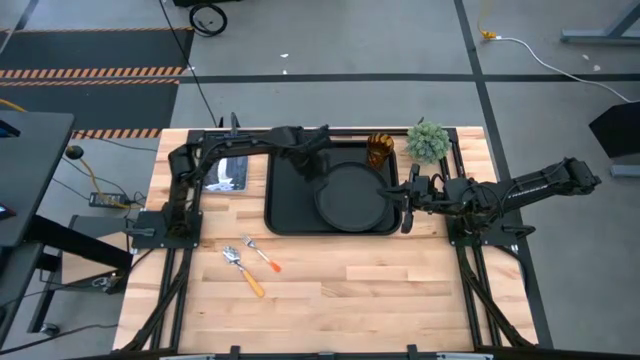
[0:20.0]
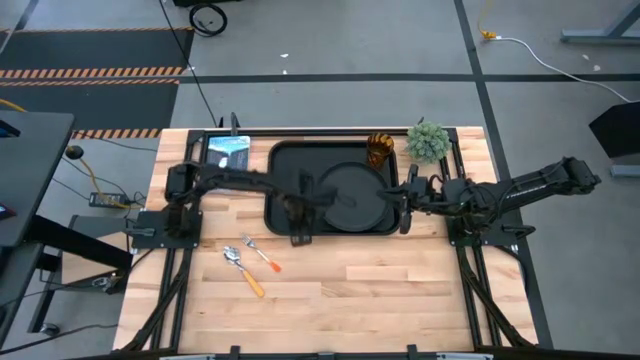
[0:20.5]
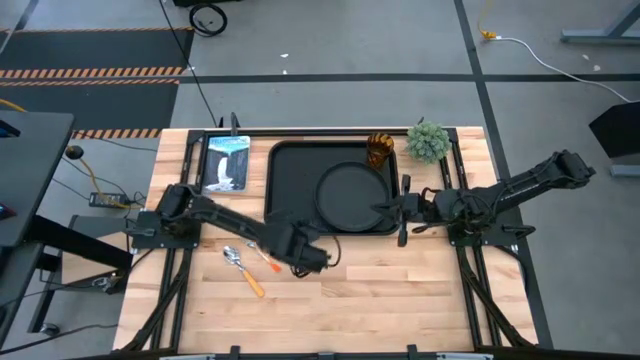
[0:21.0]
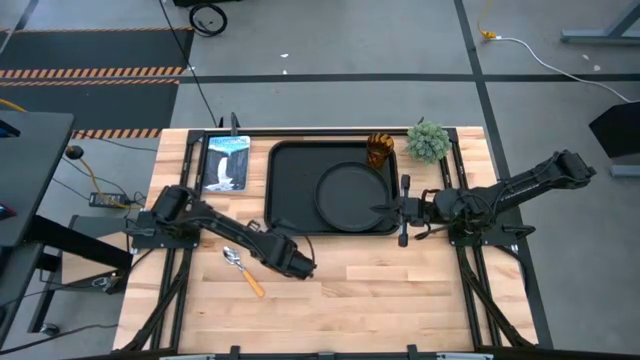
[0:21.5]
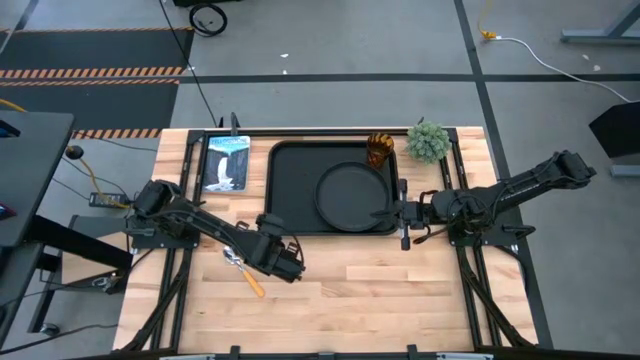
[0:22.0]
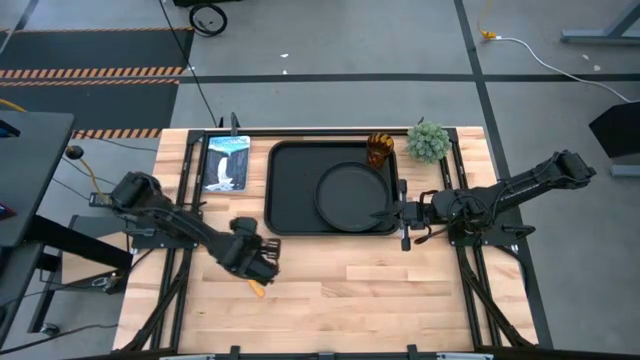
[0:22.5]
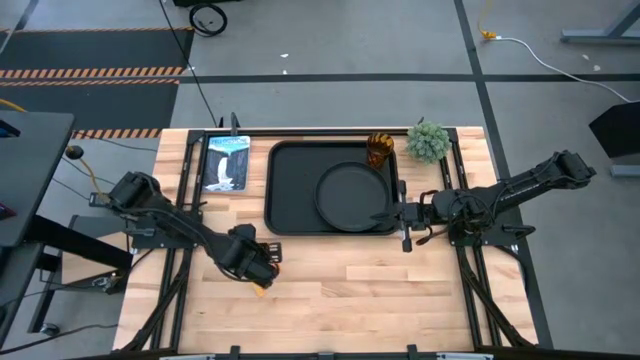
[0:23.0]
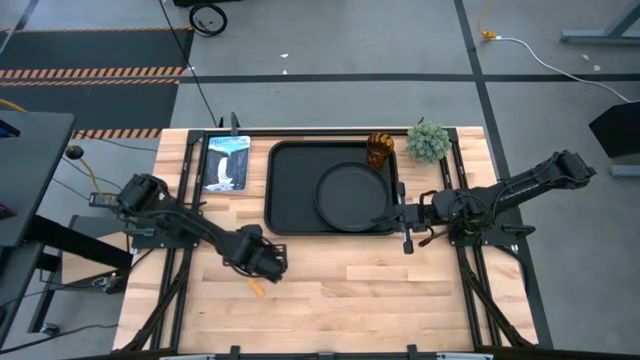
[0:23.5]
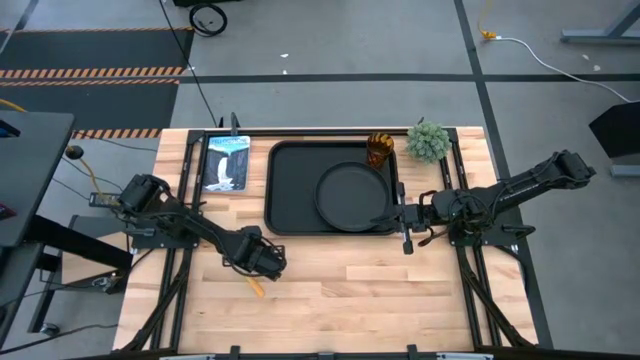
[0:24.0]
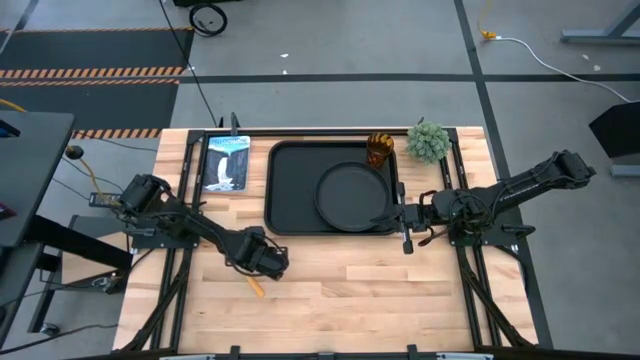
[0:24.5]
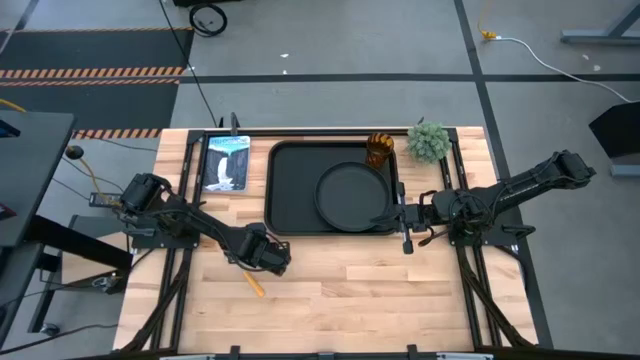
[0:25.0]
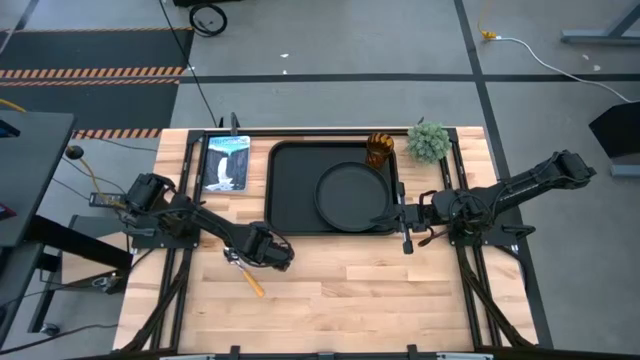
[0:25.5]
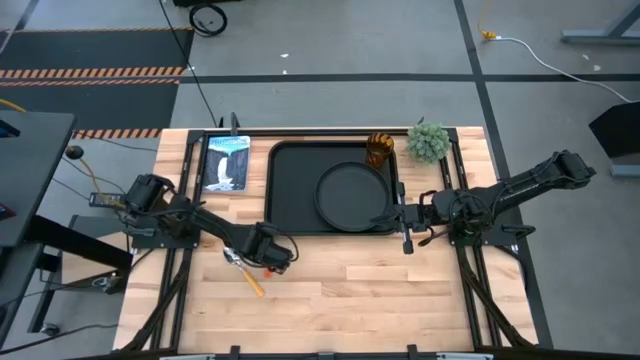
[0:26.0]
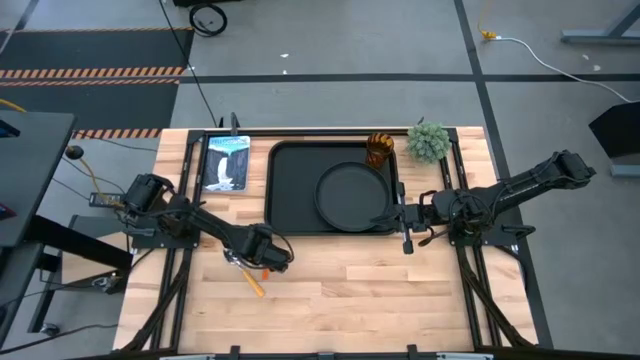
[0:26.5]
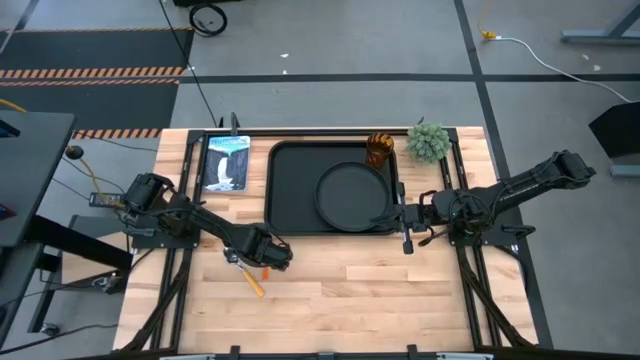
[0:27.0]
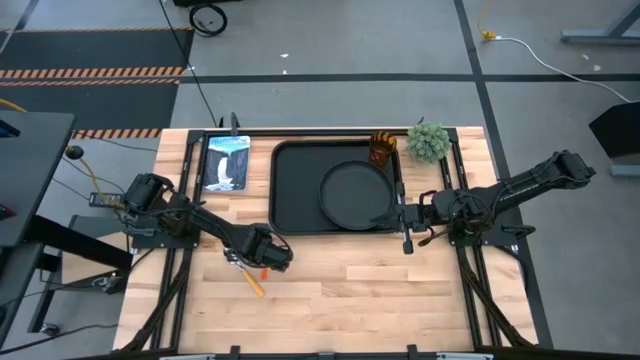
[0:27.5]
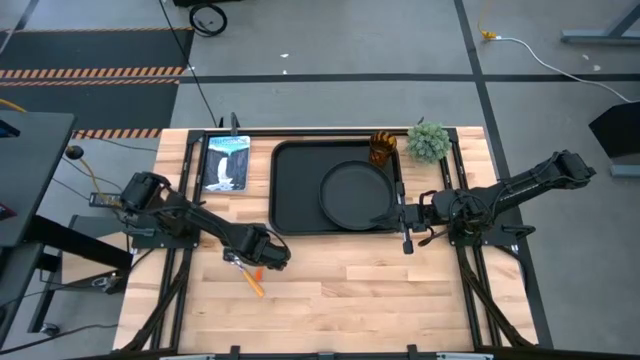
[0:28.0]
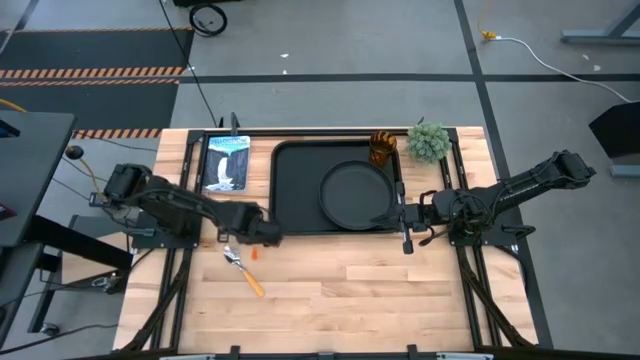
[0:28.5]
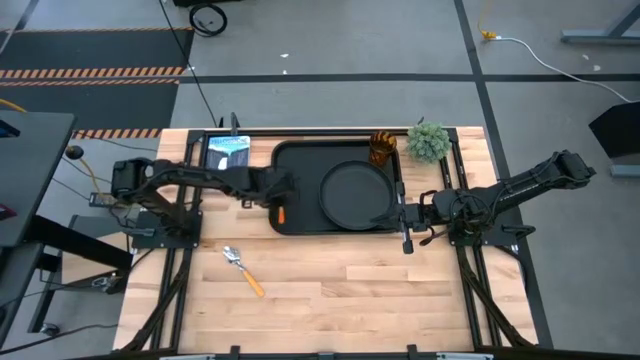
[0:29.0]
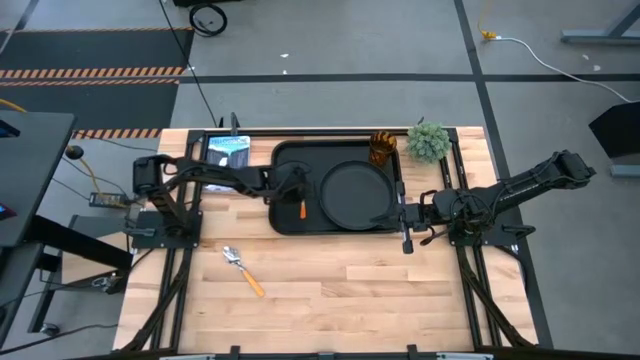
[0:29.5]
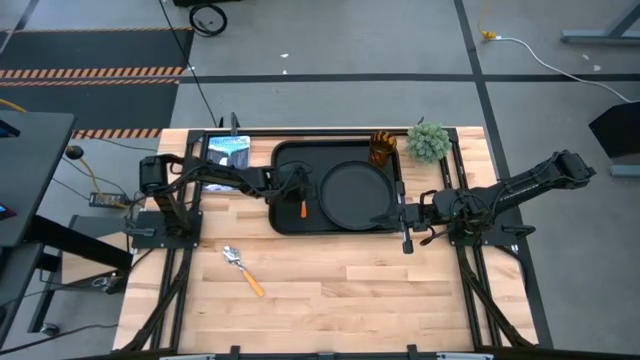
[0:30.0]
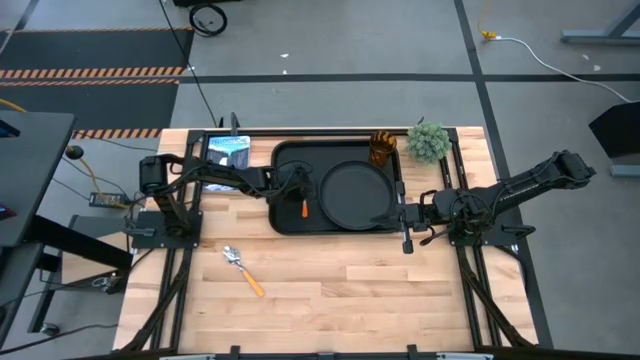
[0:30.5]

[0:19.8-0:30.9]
Task: Pick and place plate/cup/fork/spoon on tray
Put the orange fork on the black tray

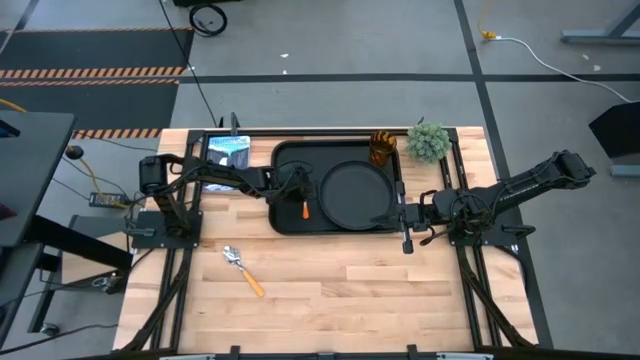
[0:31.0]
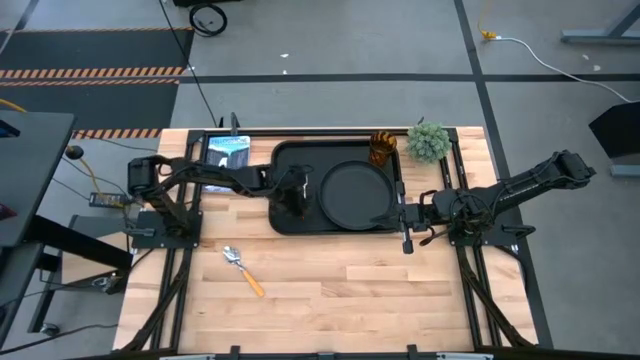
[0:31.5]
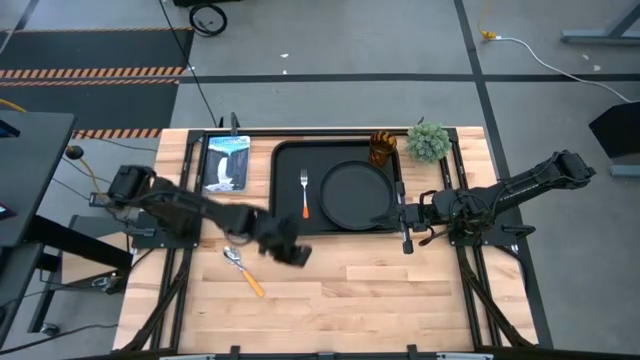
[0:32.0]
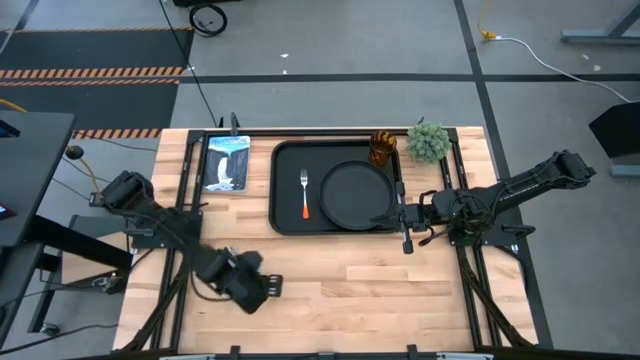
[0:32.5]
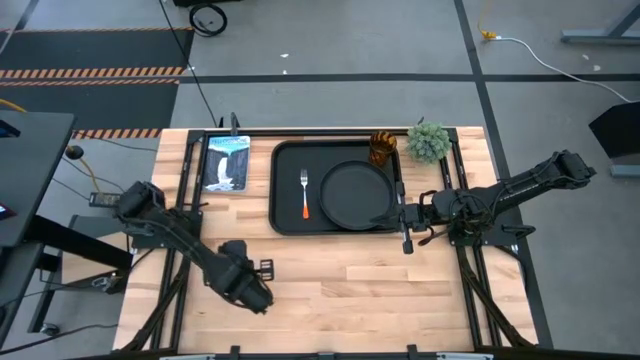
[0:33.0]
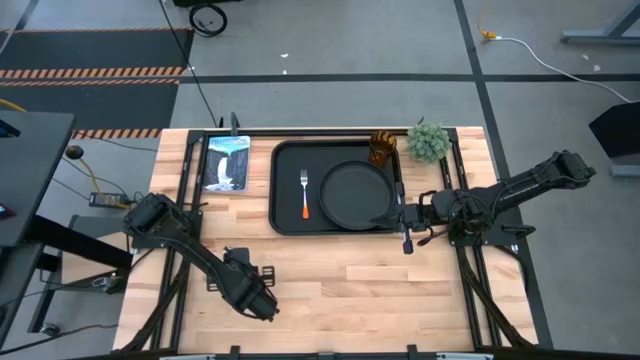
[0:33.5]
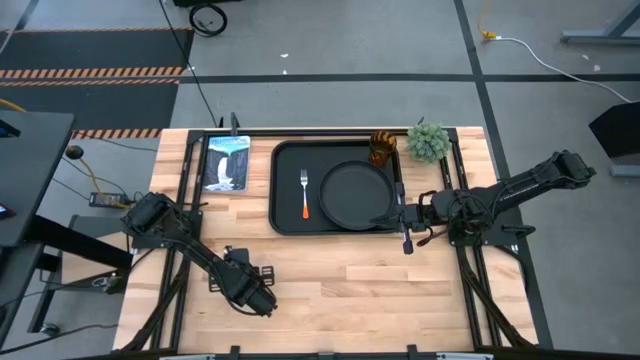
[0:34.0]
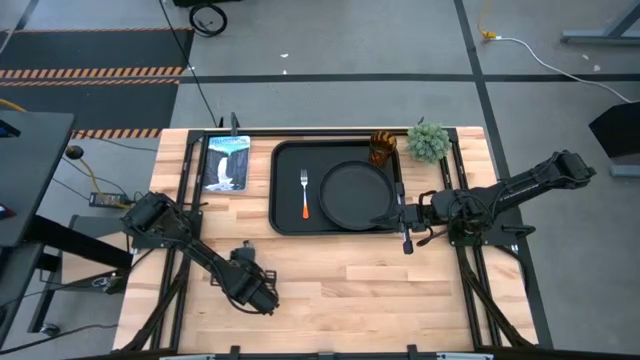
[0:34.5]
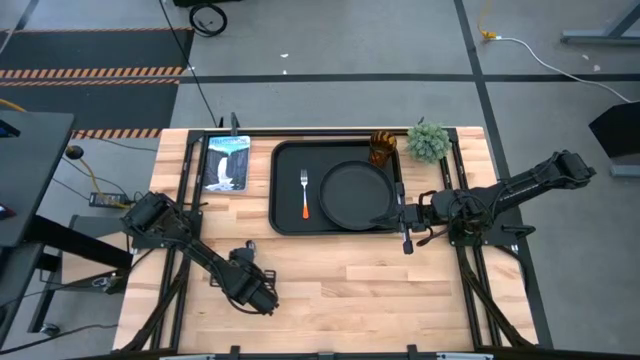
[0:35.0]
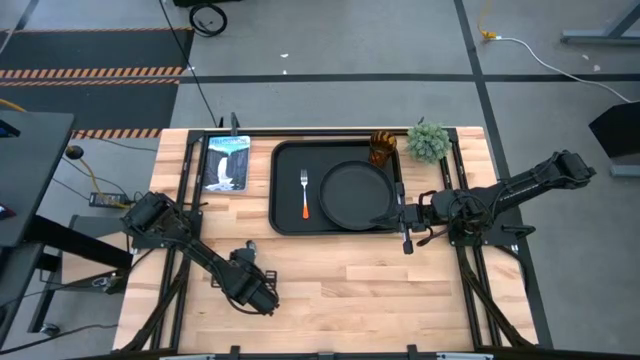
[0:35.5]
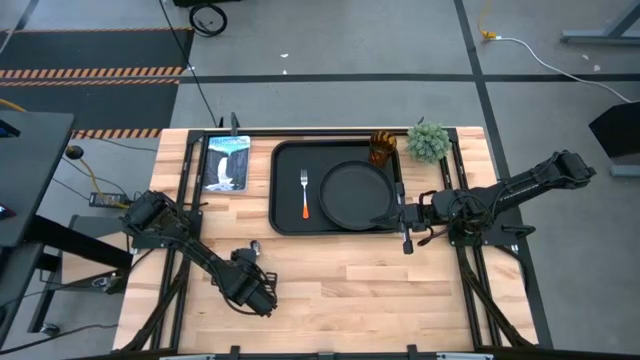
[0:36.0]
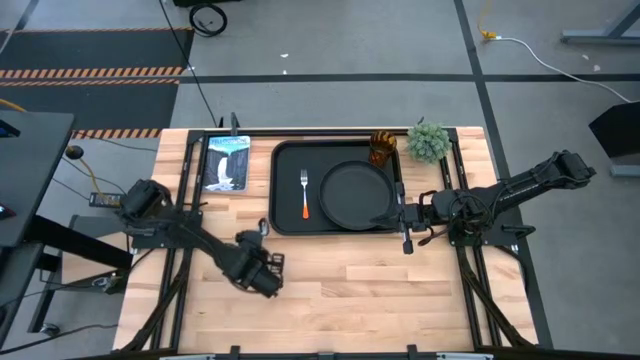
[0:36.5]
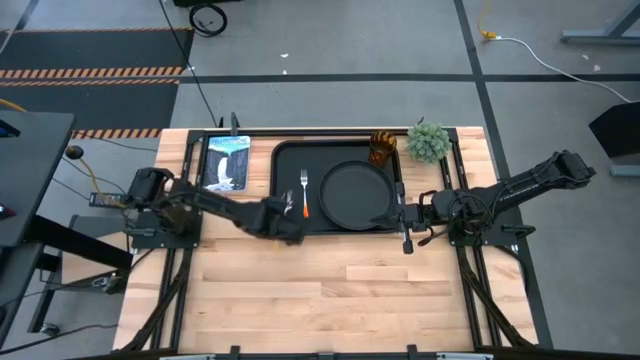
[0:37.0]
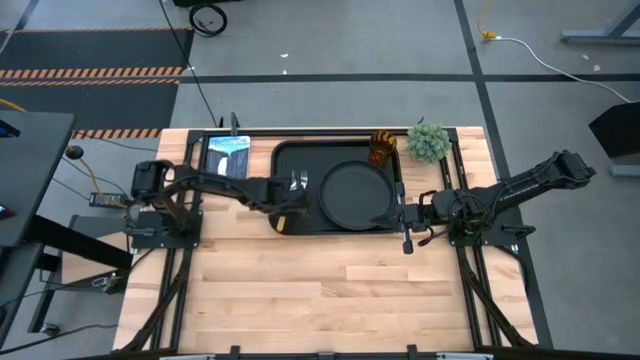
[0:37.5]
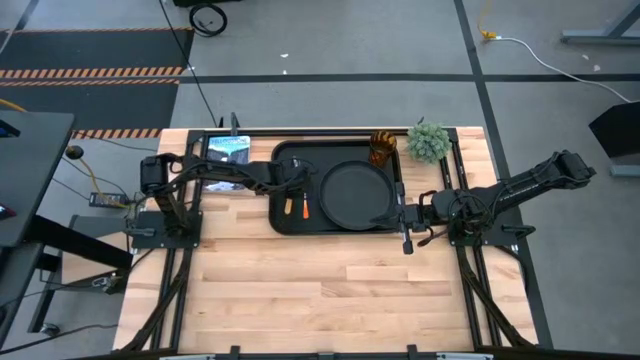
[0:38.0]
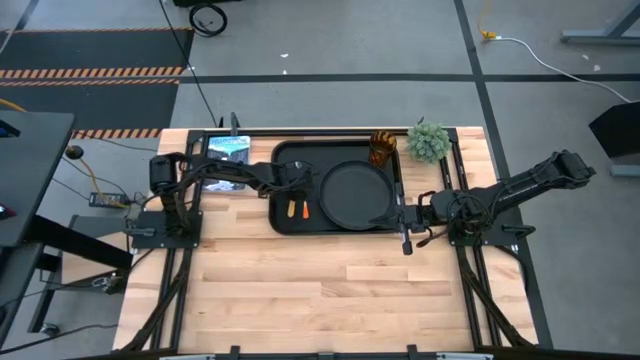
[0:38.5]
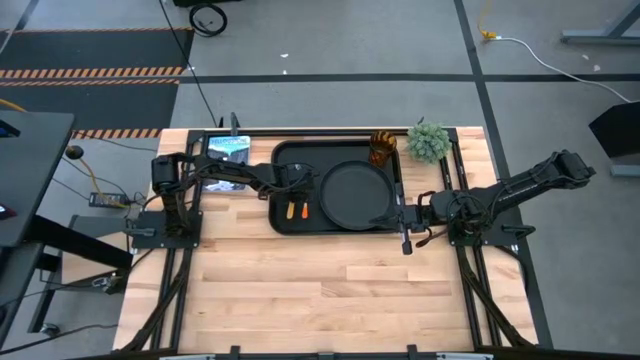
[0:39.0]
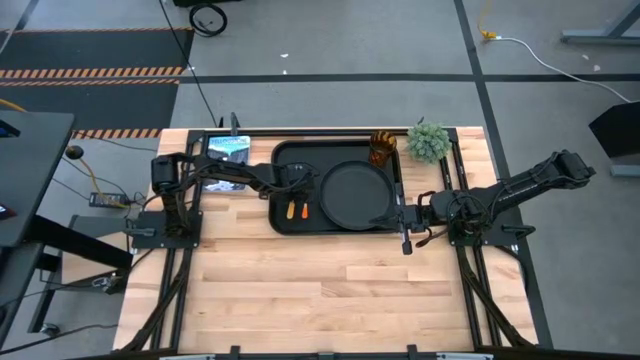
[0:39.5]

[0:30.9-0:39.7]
Put the yellow spoon on the black tray to the left of the orange fork

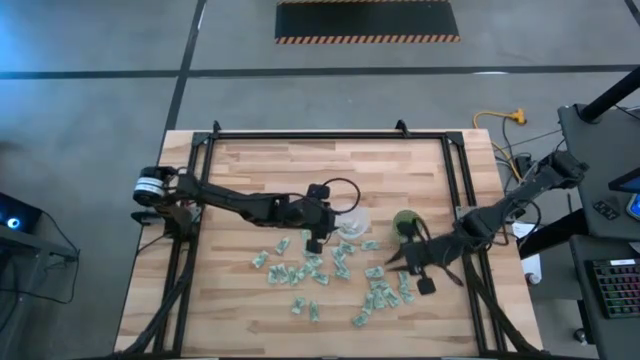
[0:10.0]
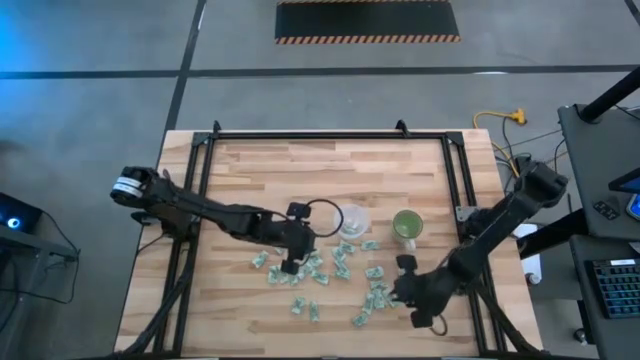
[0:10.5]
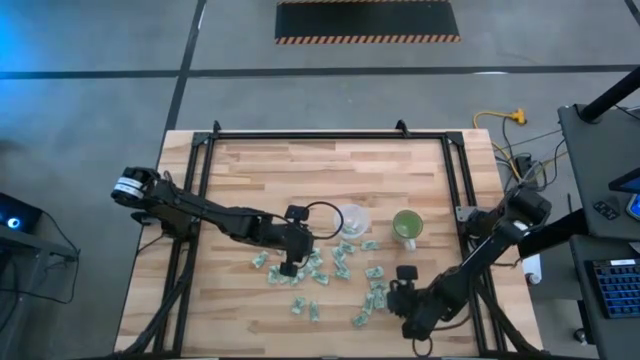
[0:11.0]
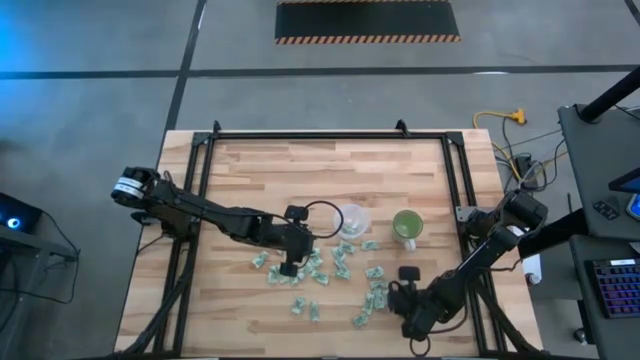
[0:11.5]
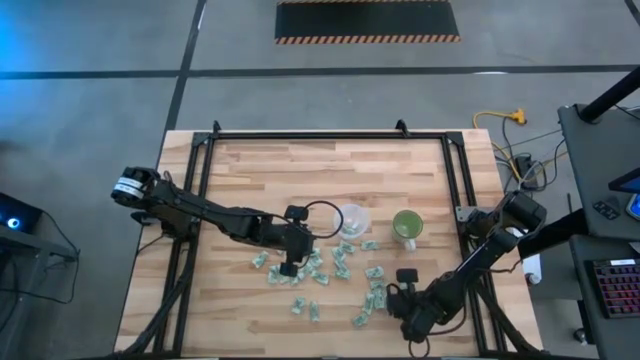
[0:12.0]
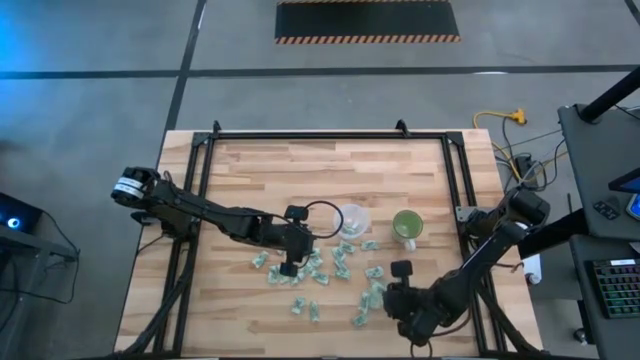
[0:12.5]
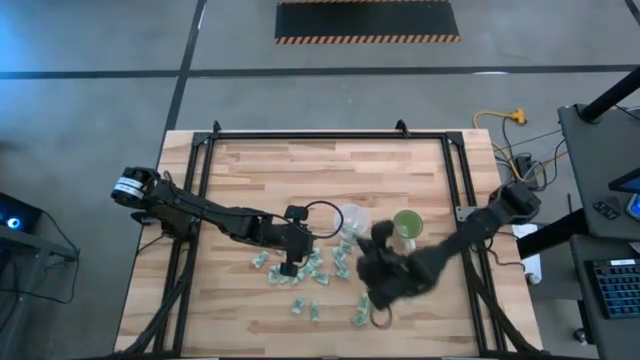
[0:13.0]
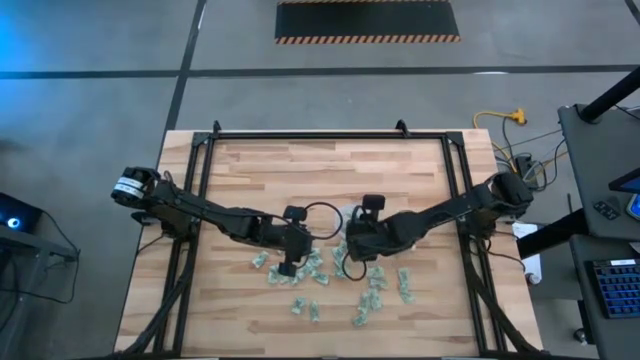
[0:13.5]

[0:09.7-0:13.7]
Task: Pick and place Stevia / Truvia into bins
Put the green stevia packet into the transparent container
